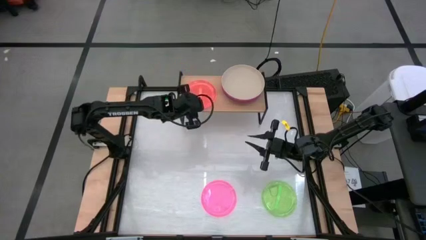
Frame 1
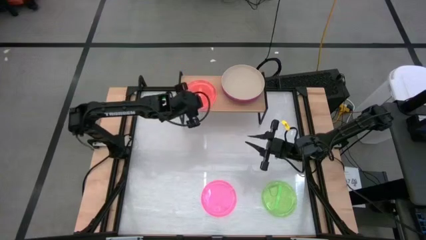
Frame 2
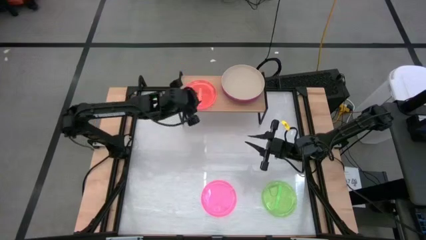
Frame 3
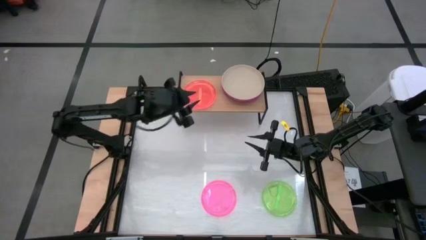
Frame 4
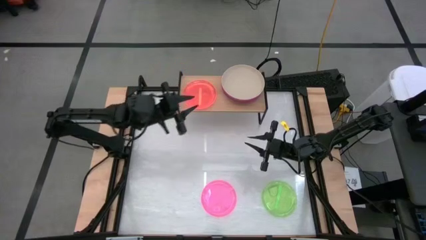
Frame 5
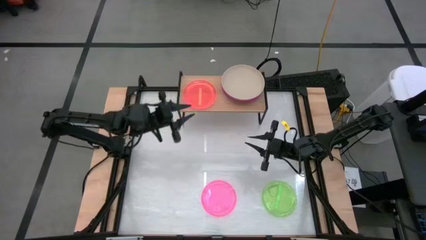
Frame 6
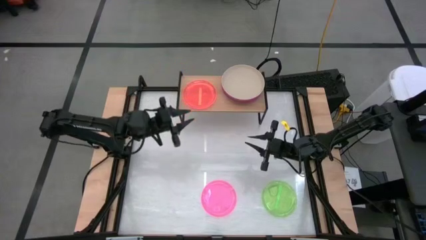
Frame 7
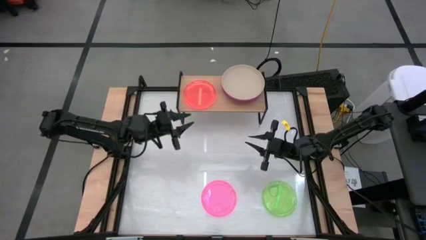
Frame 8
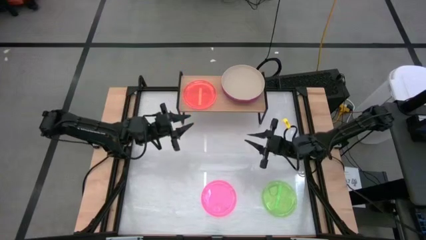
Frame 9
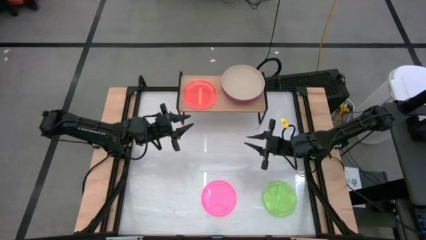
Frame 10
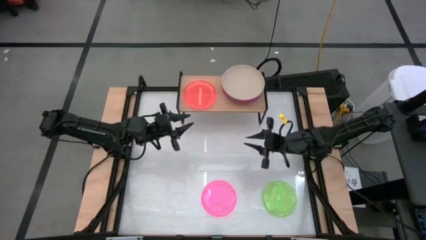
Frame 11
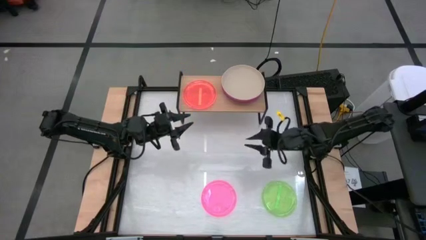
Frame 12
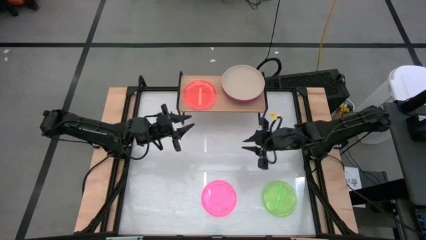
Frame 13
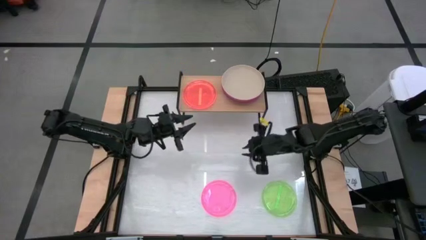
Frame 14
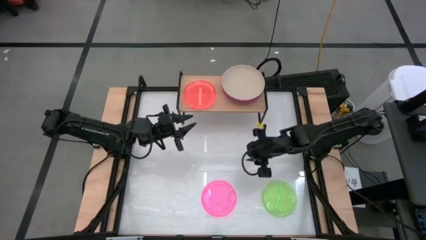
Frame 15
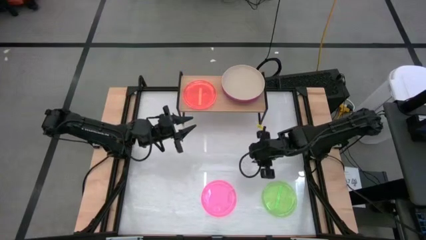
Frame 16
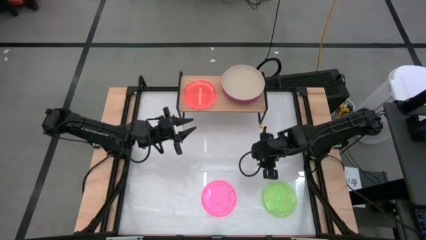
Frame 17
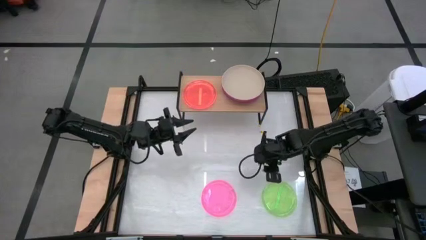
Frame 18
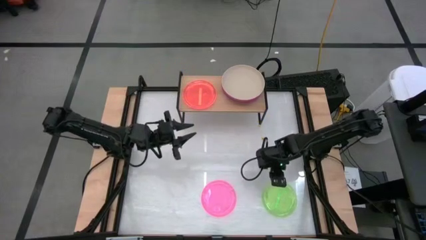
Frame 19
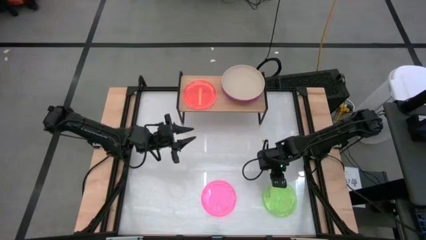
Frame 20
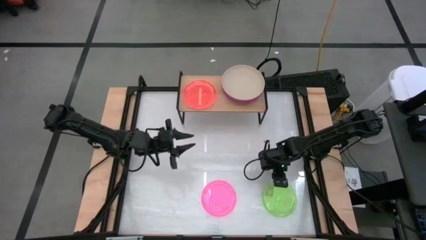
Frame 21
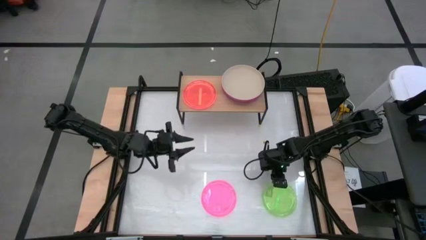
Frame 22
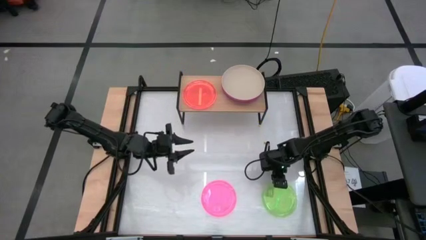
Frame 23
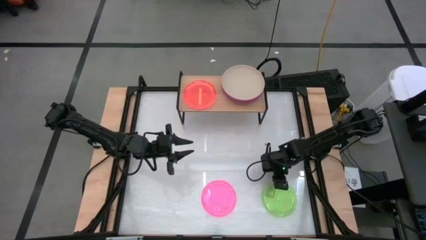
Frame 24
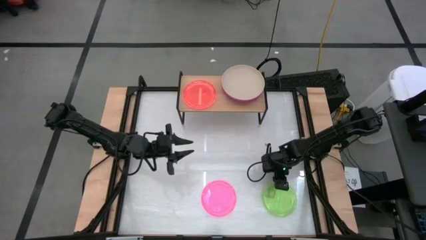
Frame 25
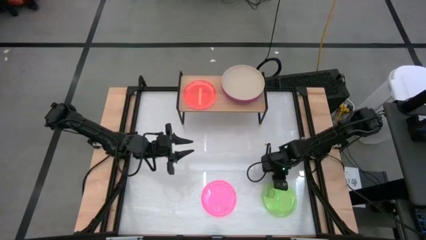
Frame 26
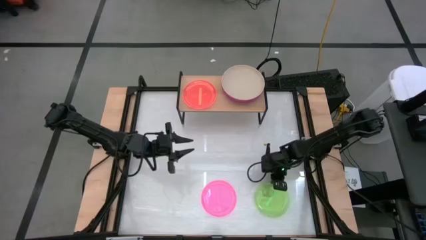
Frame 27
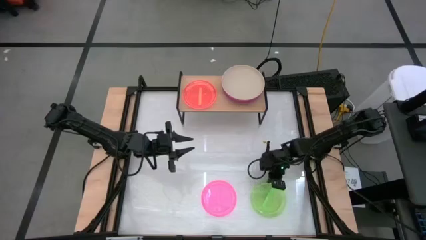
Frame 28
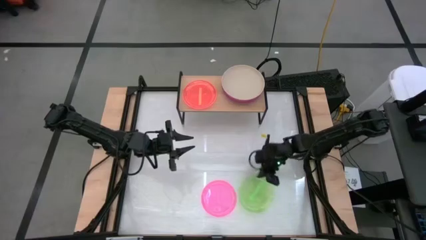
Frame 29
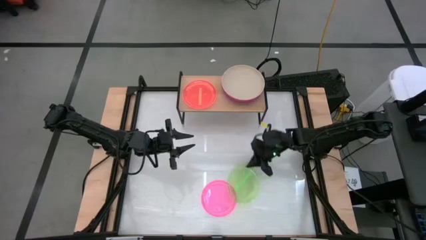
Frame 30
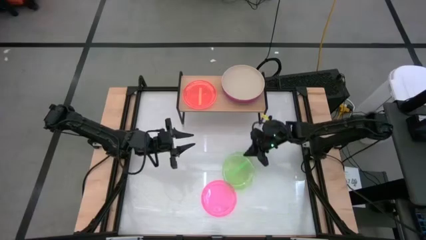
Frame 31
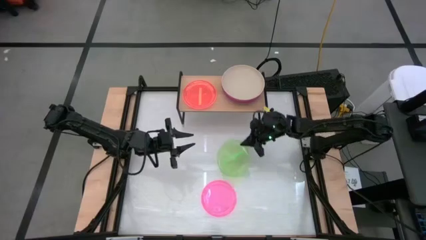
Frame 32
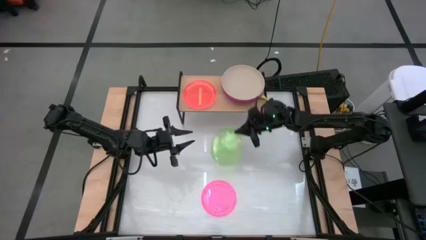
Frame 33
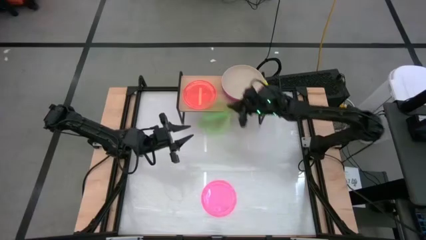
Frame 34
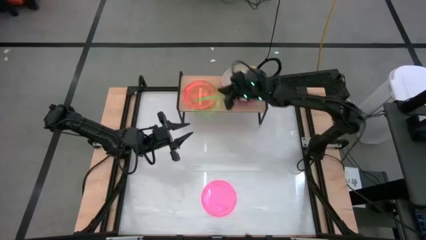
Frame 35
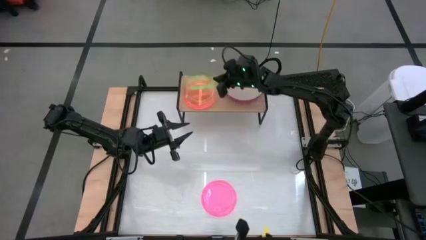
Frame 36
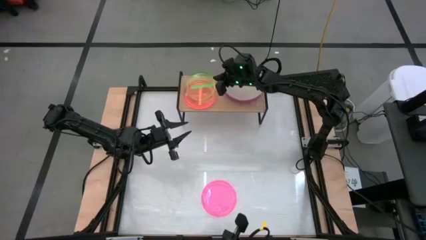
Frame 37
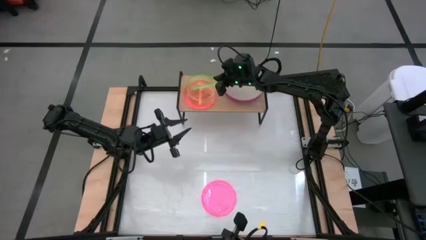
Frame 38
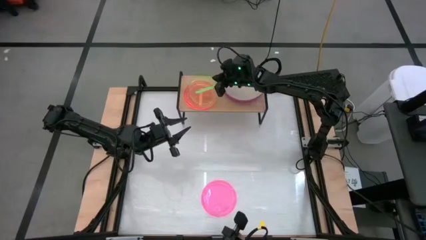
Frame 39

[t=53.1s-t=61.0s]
Task: Place and stack plates onto a shelf
Stack the green plate on top of the orange on the shelf

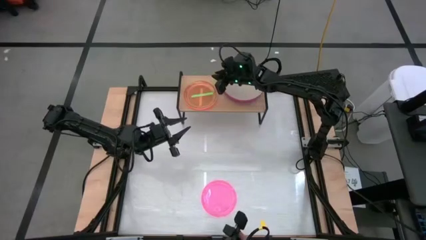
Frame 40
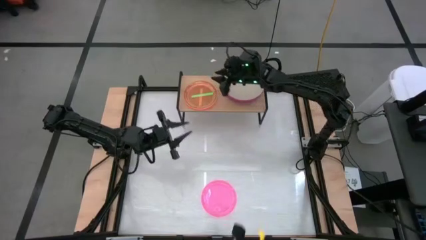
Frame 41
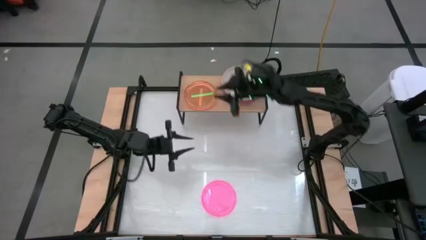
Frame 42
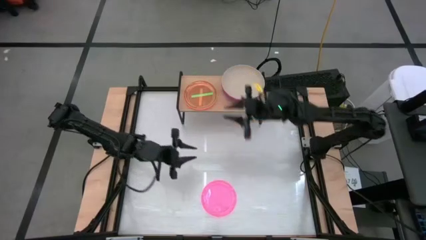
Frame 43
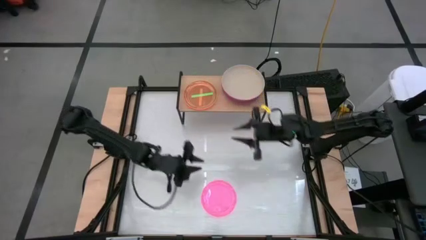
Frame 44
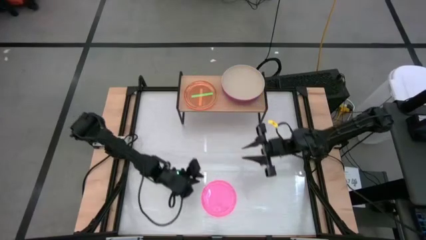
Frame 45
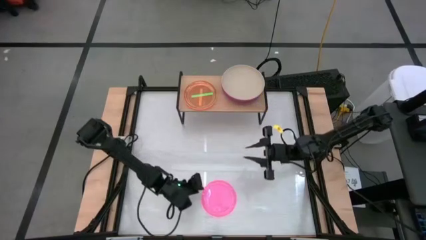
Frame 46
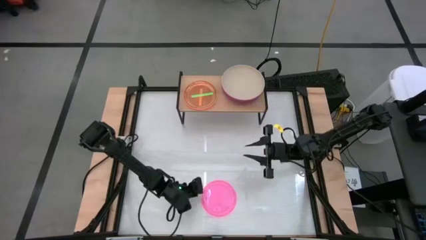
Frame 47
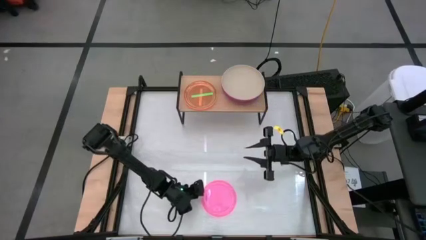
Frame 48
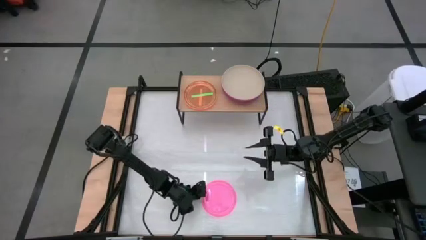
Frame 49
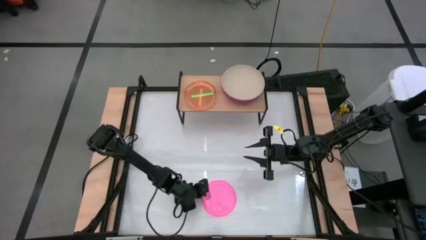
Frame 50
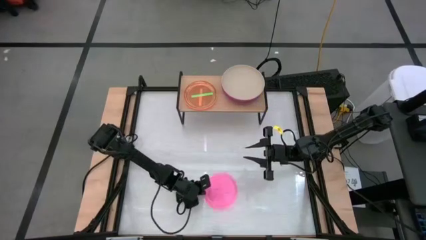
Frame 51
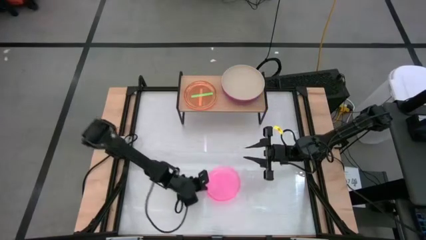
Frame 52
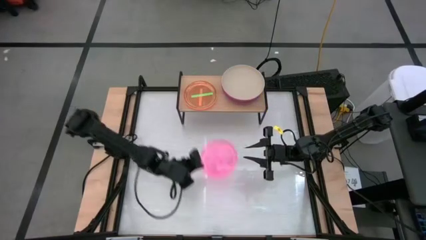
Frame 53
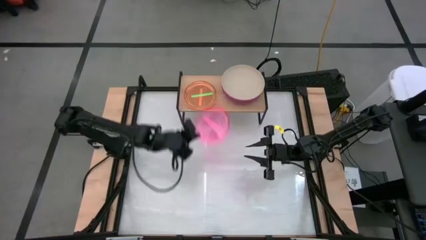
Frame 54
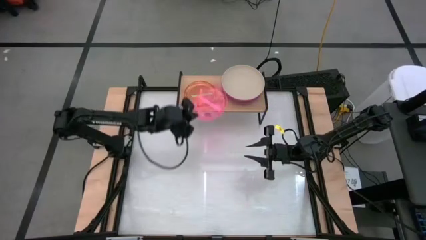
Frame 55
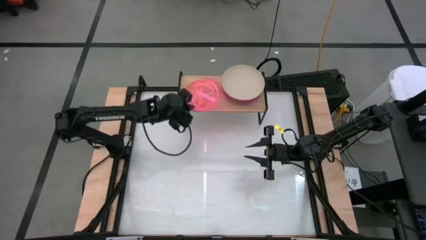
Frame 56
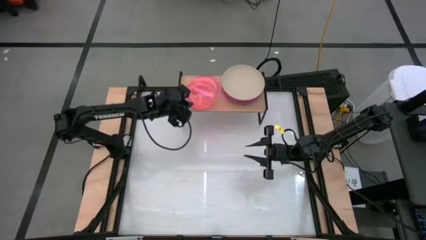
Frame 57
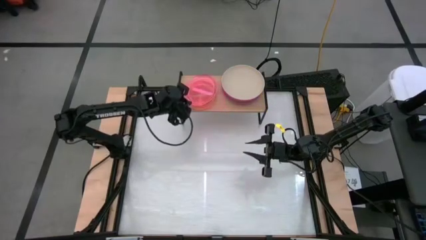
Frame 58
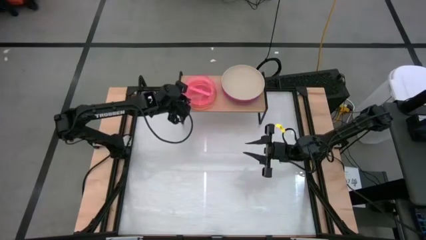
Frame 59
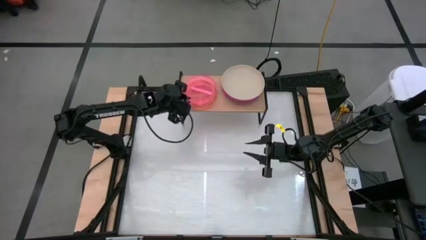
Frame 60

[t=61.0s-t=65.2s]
Stack the pink plate on top of the orange plate on the shelf

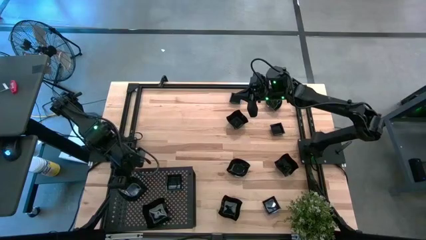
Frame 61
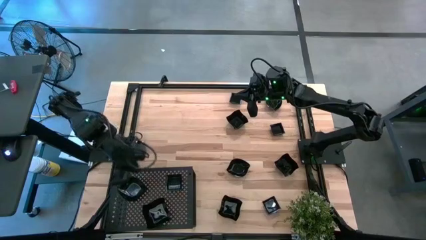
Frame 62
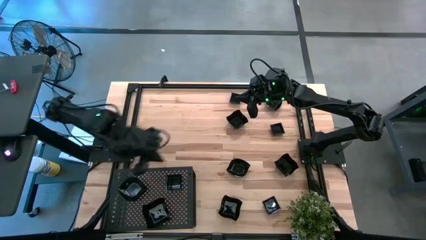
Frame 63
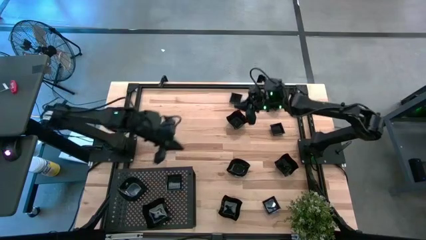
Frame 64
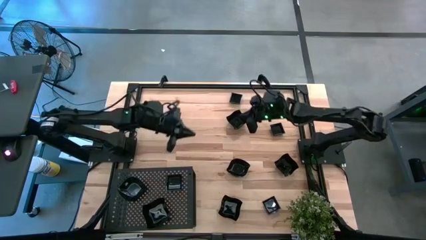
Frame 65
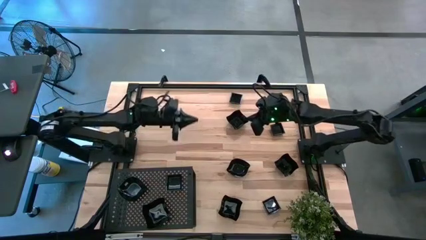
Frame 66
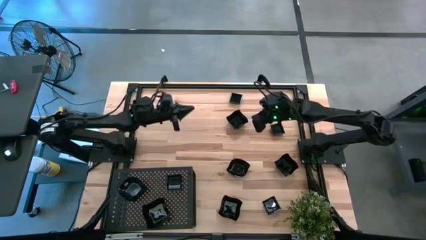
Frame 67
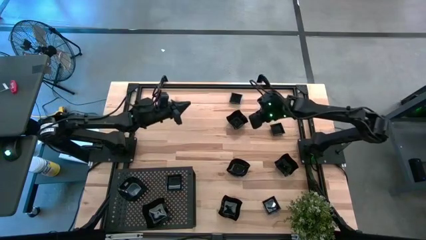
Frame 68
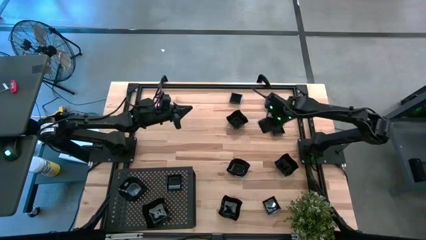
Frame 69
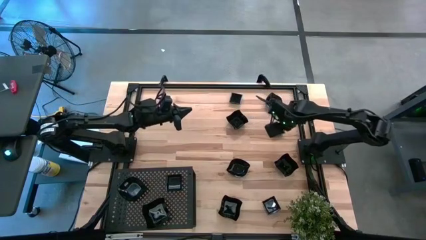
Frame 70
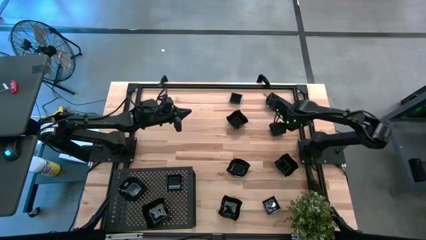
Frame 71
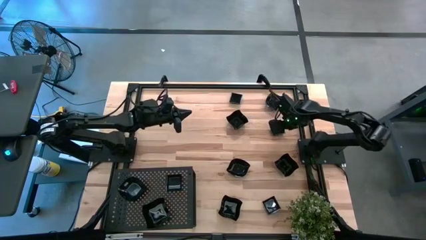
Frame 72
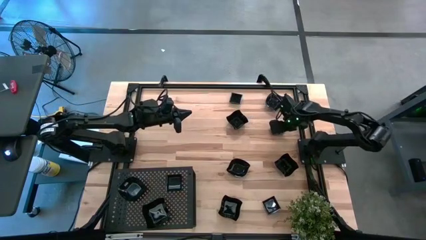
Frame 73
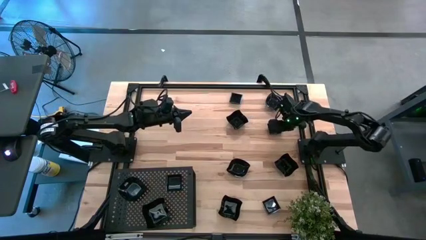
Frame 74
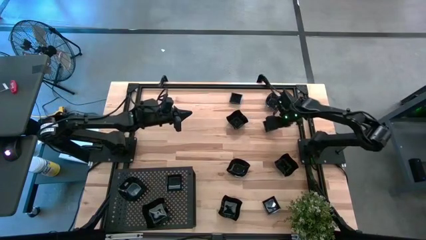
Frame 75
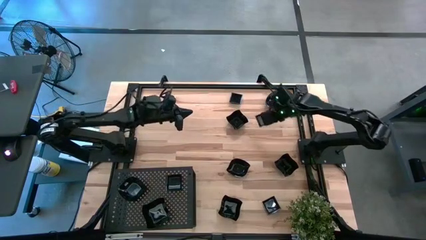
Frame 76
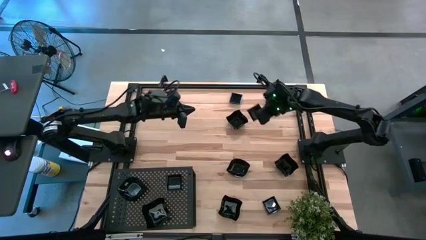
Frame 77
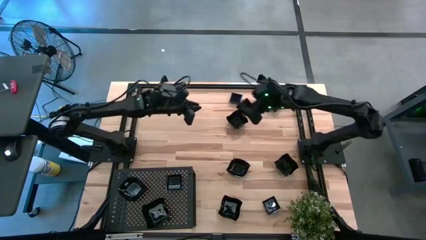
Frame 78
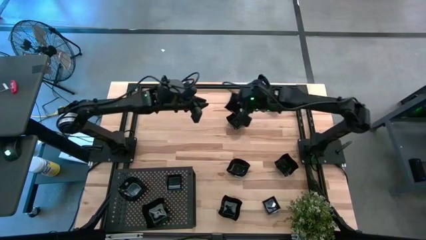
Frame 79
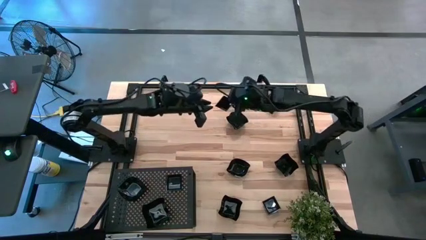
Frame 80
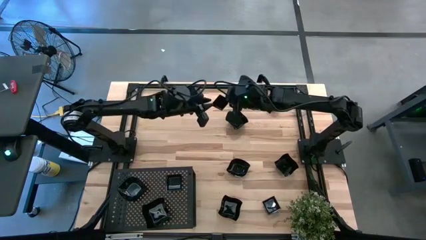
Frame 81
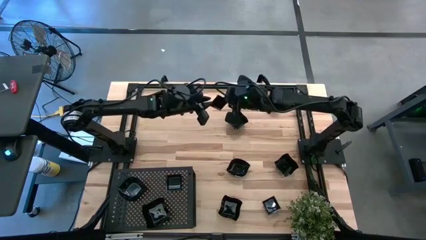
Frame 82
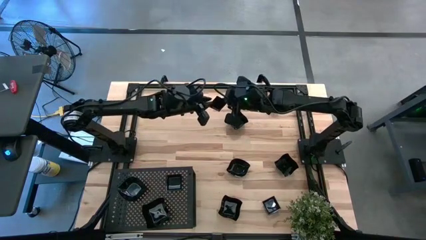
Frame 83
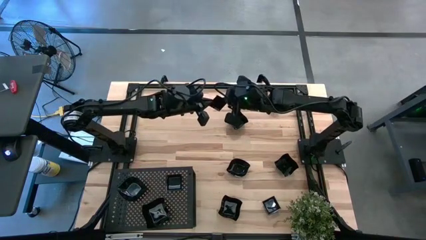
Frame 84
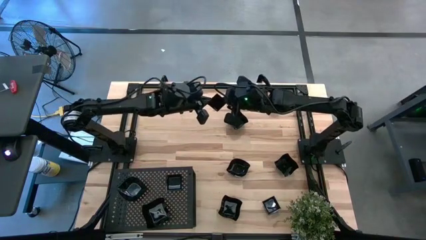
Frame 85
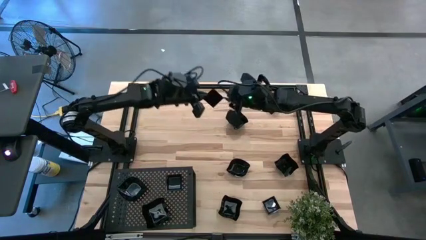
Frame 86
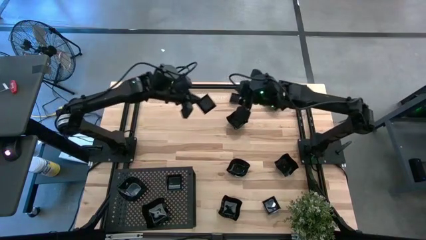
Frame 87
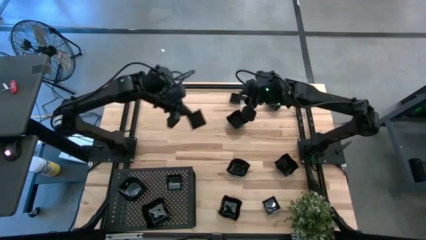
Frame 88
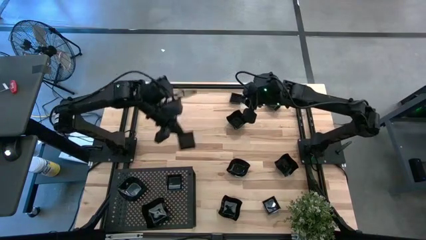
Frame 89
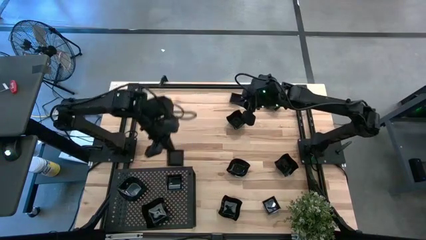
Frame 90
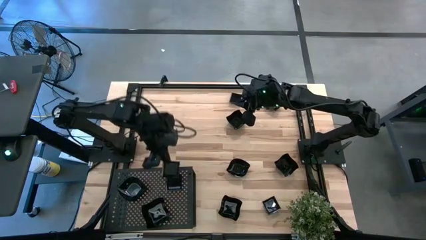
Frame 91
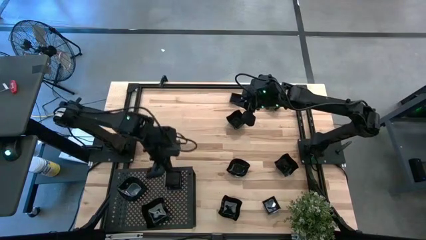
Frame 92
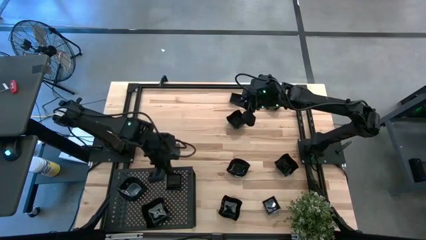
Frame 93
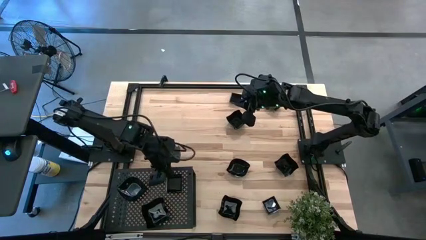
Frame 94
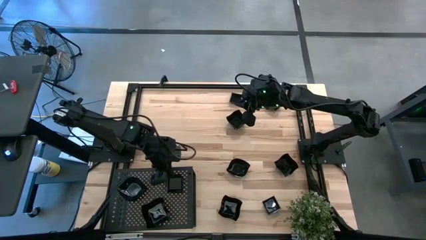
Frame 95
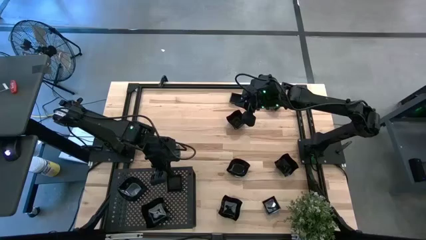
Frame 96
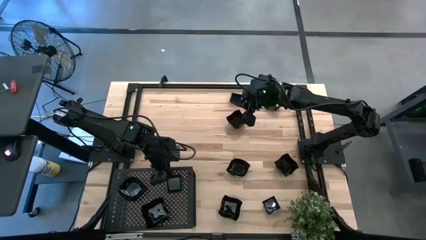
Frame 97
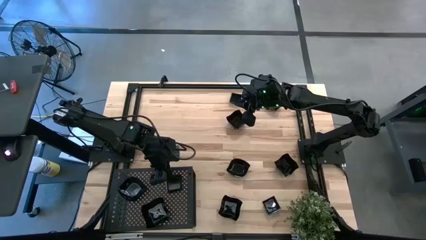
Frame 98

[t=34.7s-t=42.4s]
Task: Pick & Place Mini shaped plates
Stack the square plate on top of the square plate on the shelf
